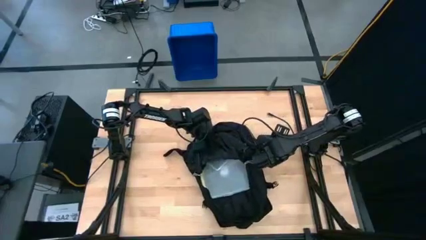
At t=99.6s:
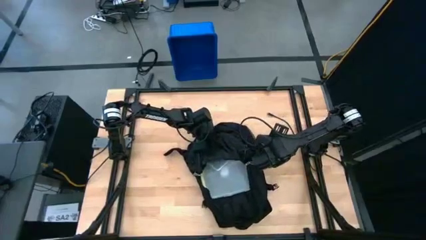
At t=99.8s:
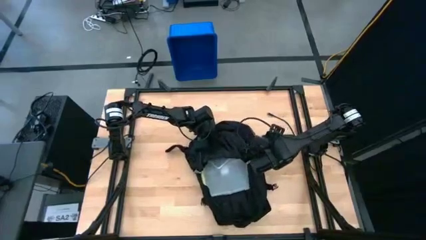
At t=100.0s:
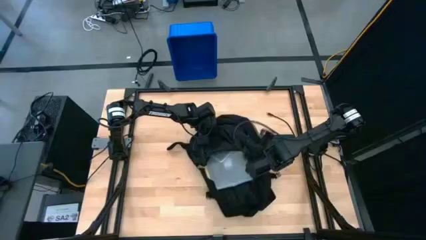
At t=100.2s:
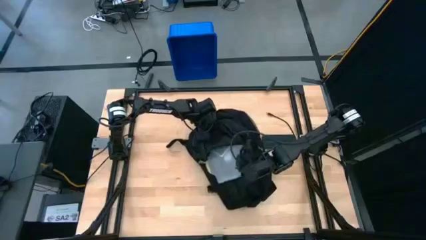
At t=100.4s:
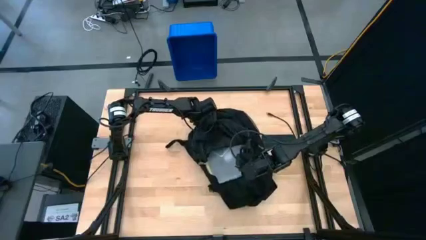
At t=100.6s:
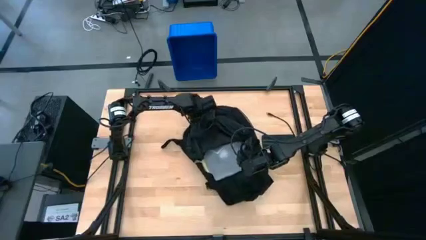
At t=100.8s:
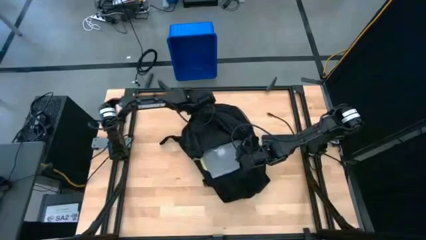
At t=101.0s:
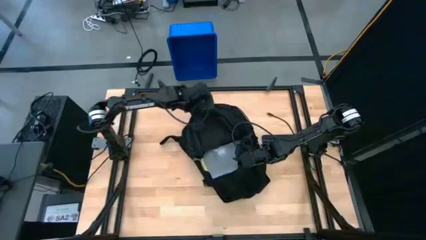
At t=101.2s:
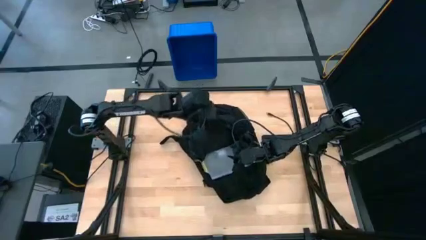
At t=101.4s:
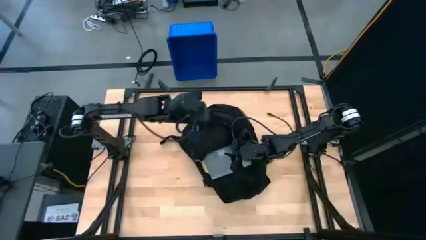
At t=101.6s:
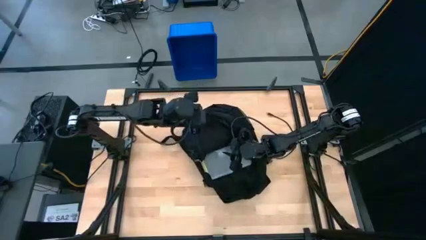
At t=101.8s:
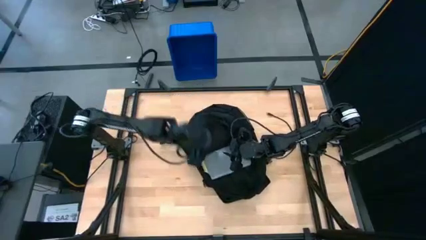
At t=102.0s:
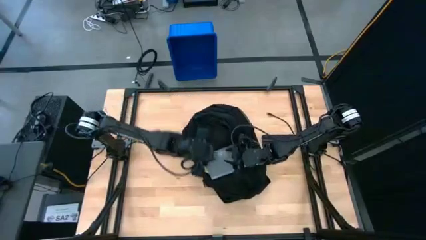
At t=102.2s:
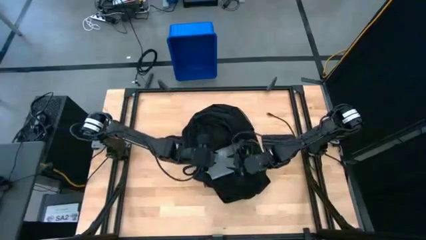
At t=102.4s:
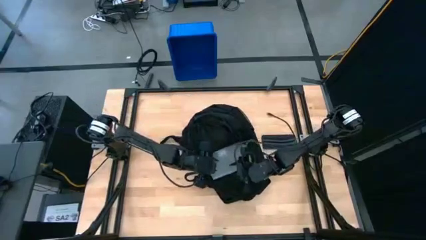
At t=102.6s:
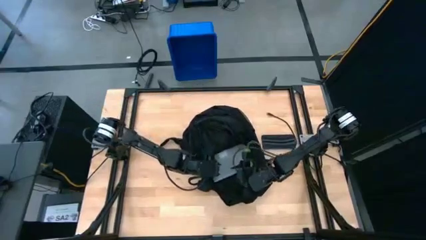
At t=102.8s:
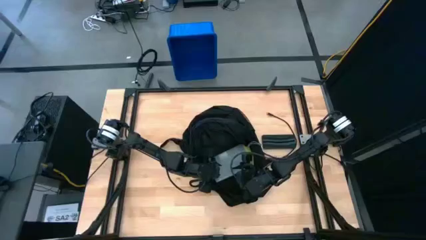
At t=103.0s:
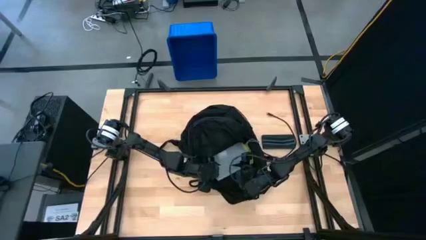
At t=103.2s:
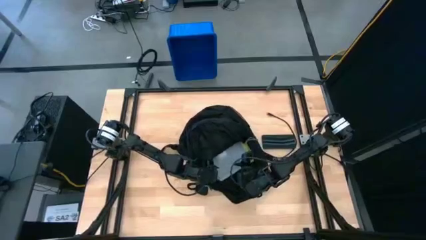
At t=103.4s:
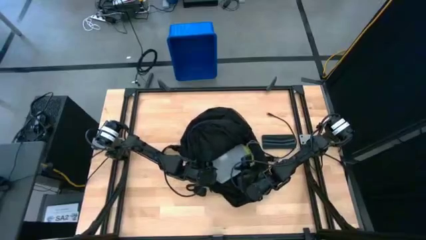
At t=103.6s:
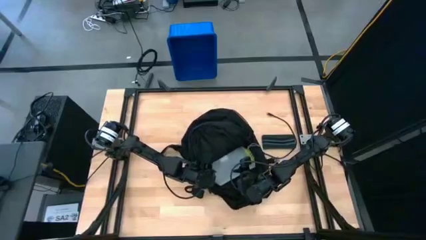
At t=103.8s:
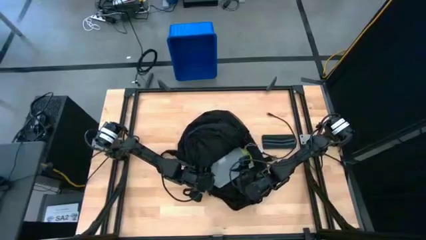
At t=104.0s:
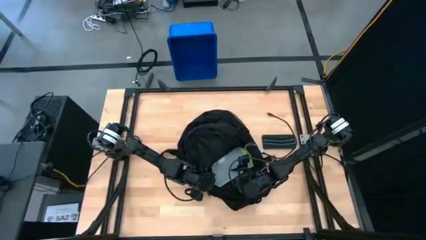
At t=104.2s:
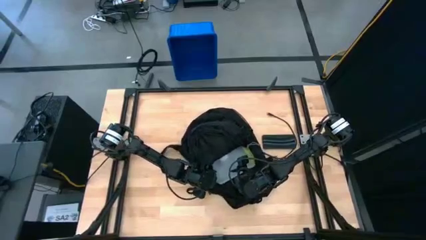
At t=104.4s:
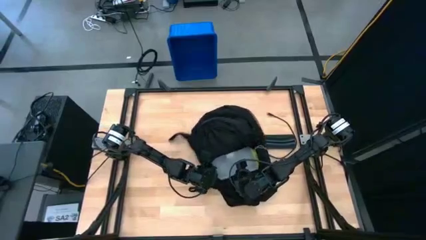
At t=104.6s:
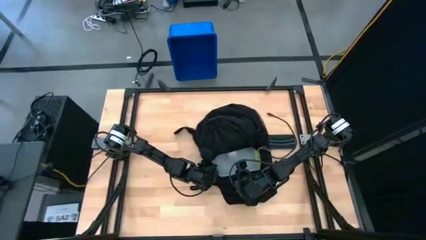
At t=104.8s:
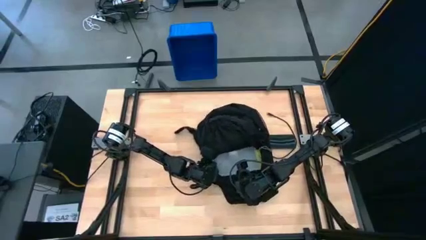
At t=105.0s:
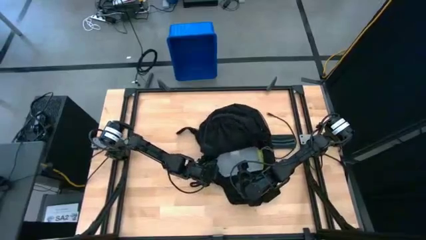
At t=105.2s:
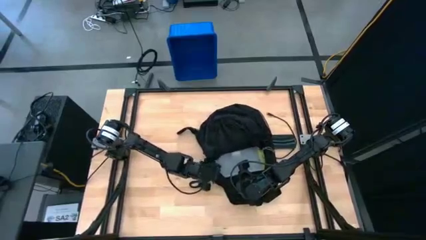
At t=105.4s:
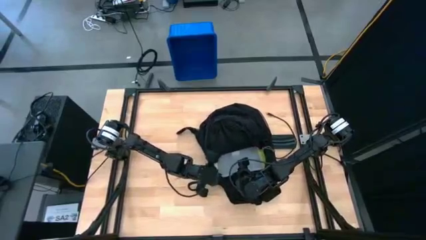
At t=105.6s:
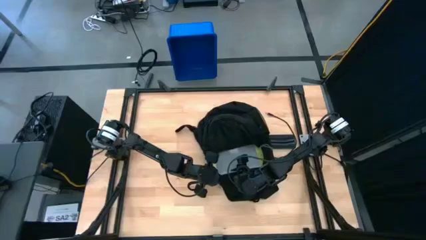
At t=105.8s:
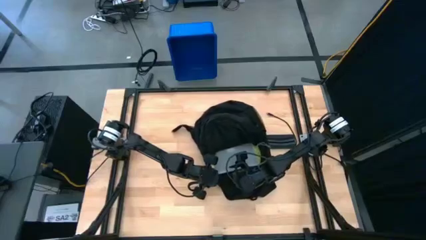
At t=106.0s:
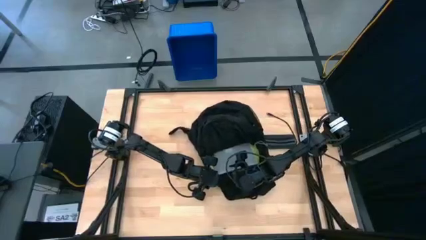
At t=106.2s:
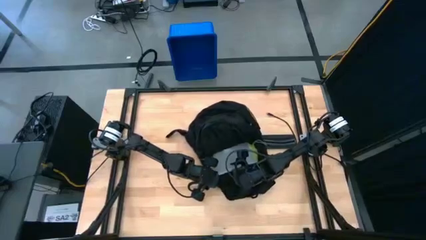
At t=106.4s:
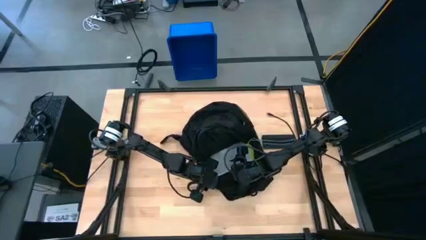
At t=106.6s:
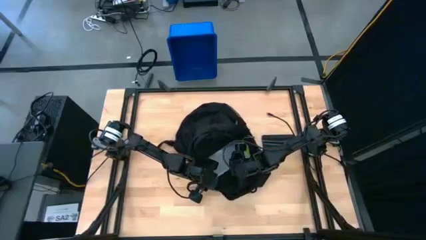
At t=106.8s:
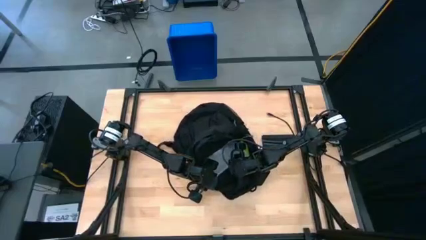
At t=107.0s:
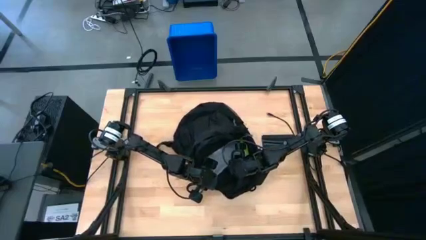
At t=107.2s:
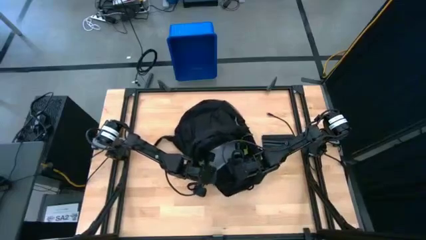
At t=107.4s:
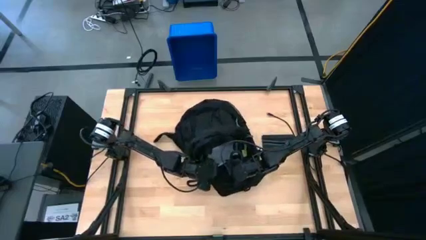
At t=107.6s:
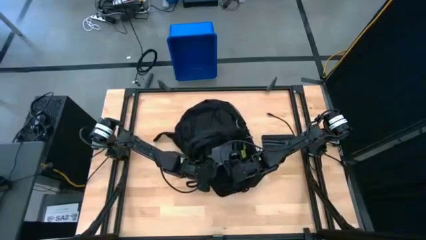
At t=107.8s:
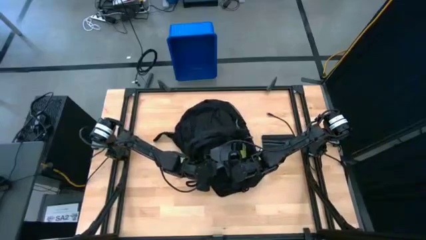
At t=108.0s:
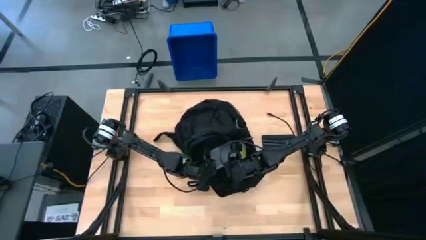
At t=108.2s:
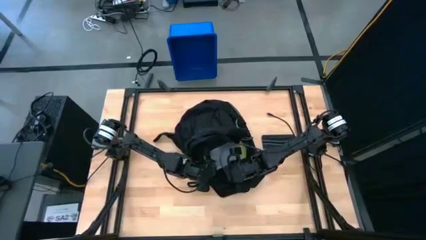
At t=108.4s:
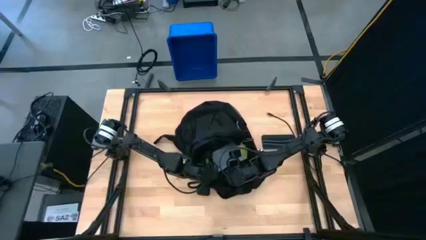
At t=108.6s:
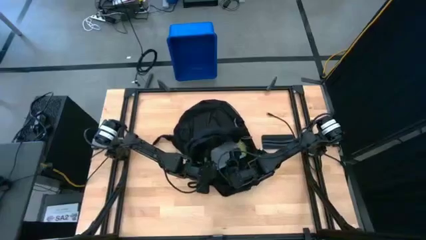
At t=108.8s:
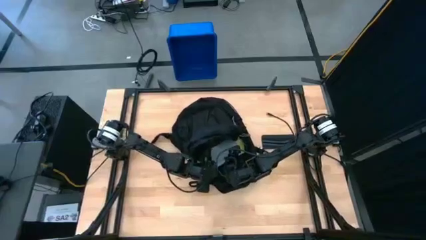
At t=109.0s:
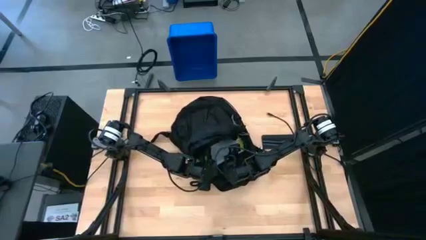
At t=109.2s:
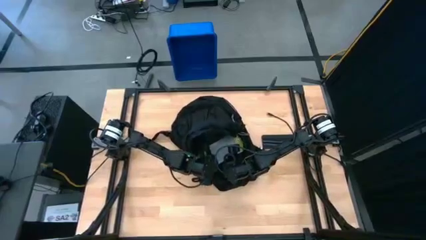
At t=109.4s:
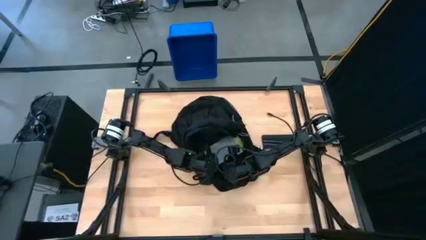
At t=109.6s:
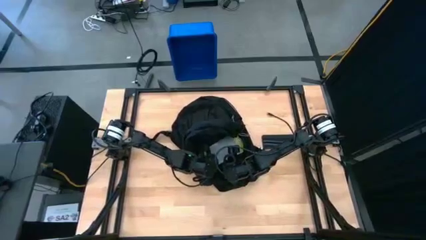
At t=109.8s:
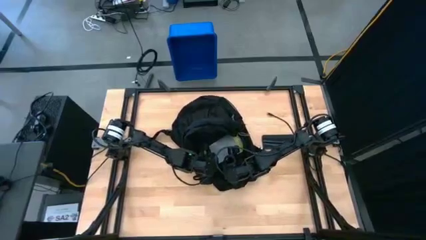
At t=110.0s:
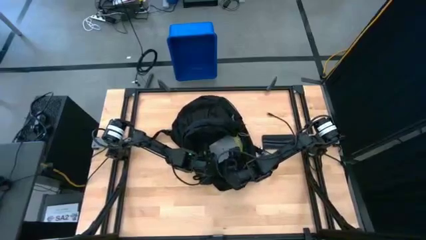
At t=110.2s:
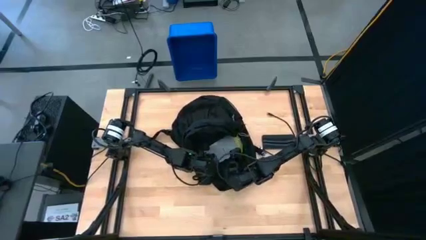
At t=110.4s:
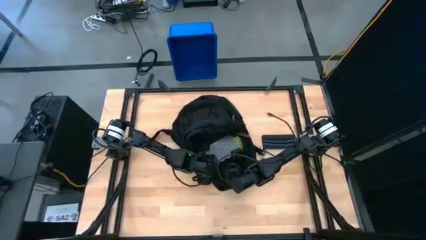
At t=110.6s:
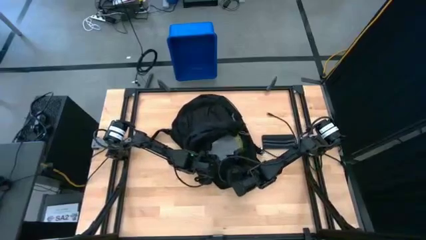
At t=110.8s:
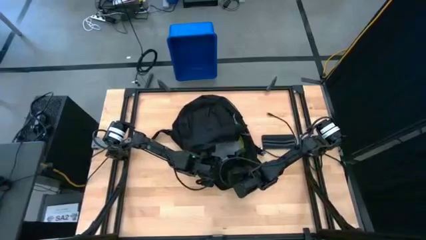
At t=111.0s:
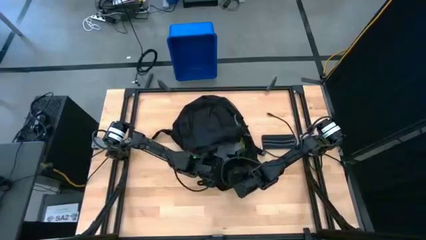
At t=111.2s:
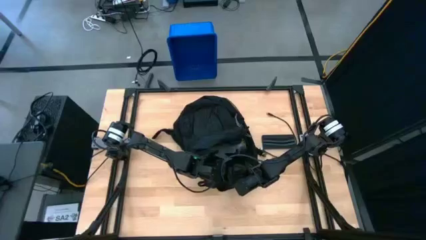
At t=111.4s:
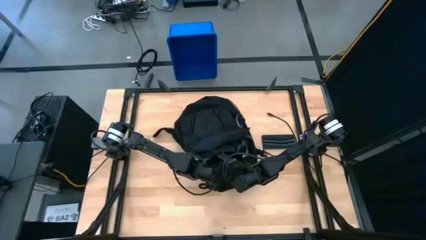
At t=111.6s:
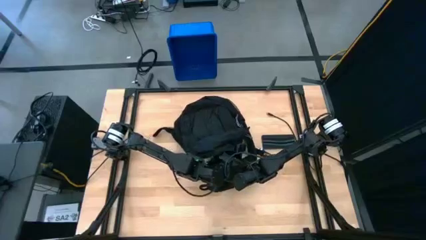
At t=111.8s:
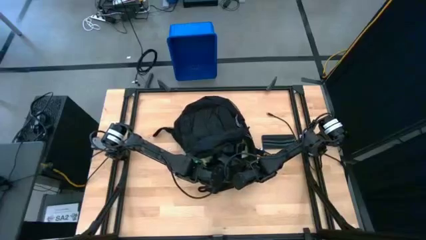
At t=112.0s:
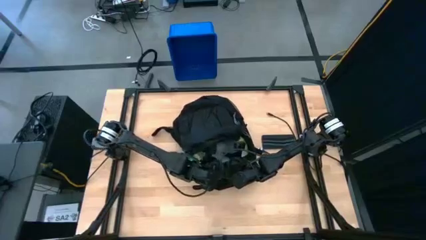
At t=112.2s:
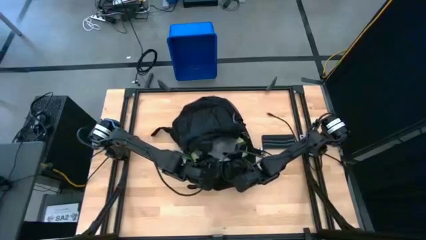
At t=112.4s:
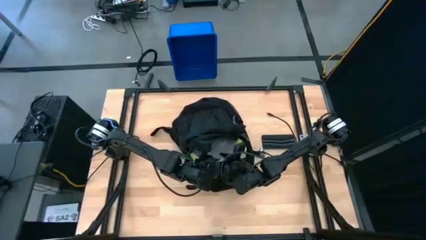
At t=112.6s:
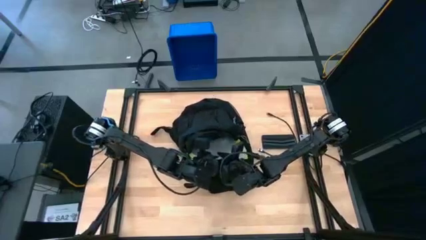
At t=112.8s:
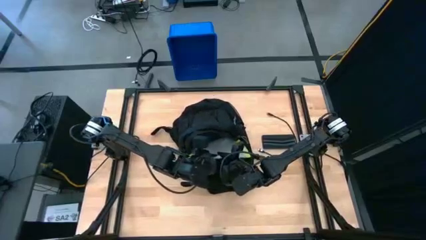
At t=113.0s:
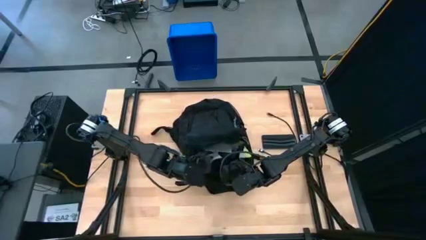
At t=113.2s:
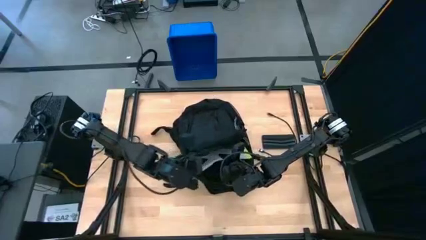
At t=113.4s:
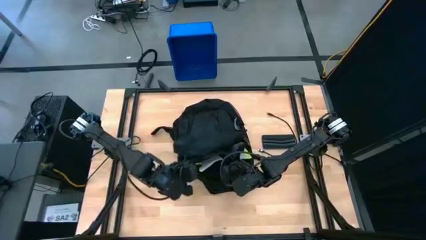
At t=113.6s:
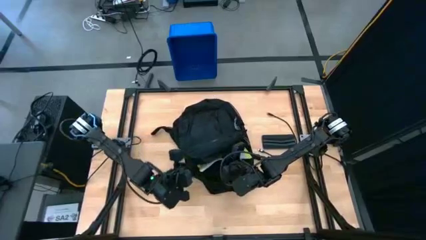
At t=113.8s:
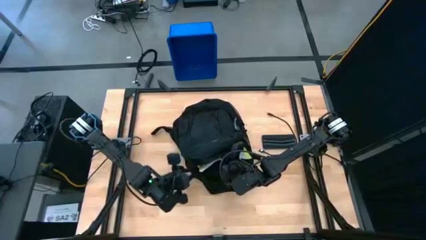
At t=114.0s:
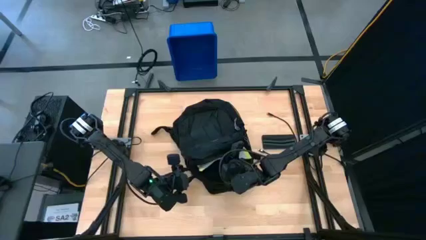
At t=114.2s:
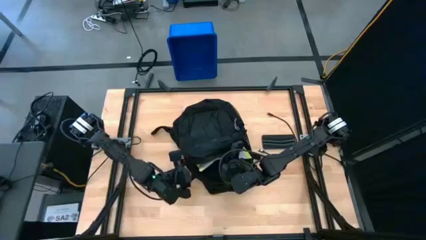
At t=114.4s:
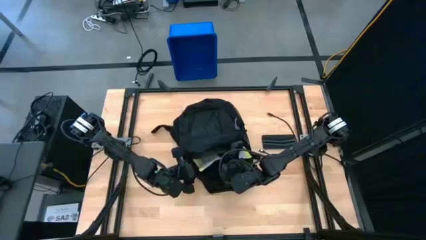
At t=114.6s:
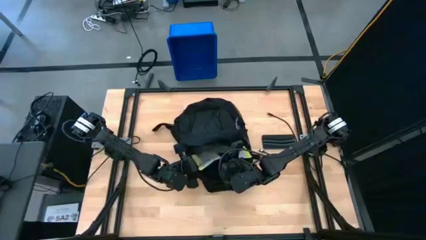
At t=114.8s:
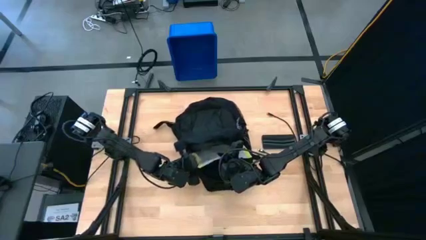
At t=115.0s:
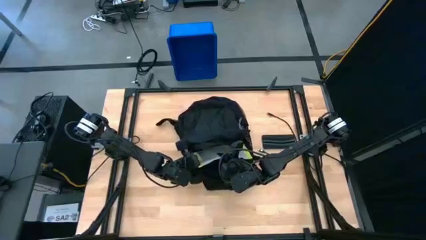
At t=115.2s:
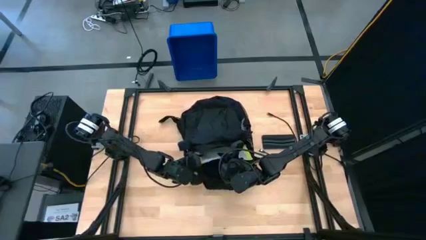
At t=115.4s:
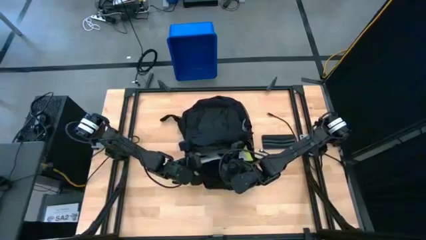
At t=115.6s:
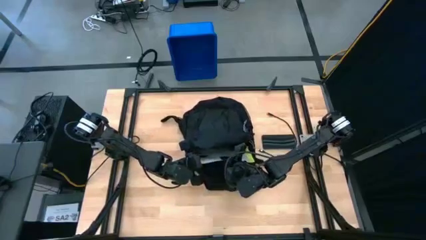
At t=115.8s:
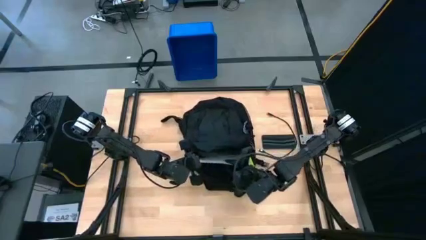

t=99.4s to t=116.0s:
Task: Unpack backpack
Remove the zip lock bag from the backpack
